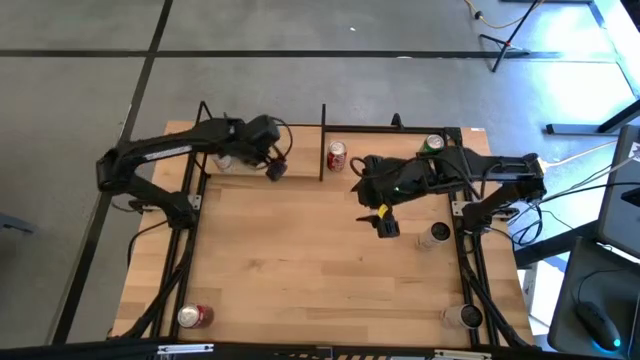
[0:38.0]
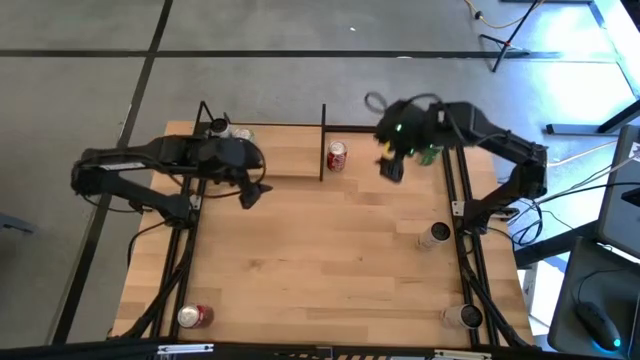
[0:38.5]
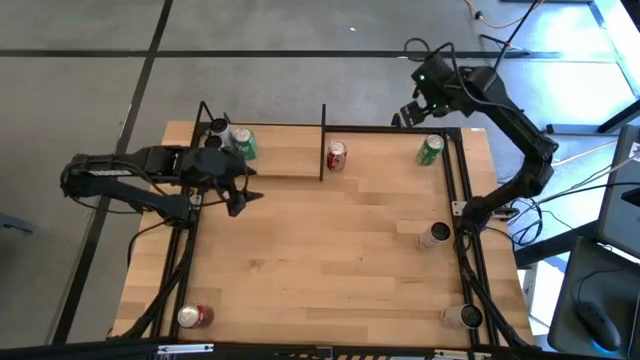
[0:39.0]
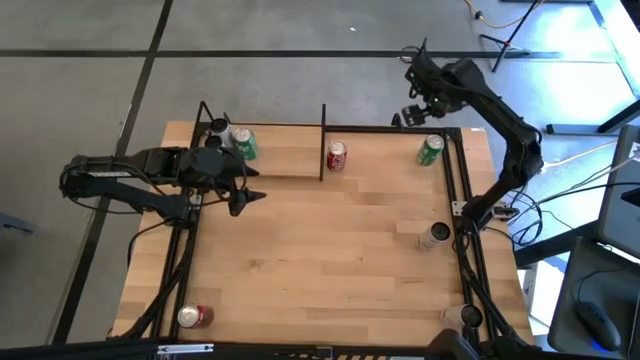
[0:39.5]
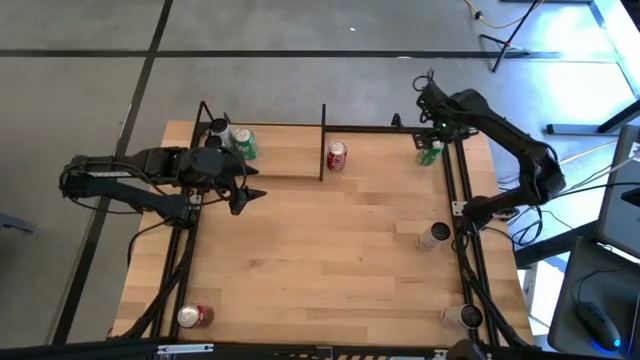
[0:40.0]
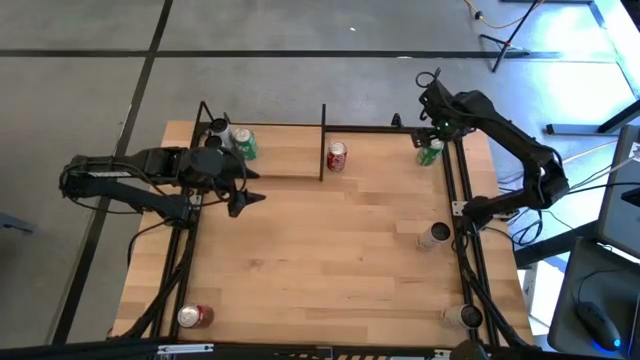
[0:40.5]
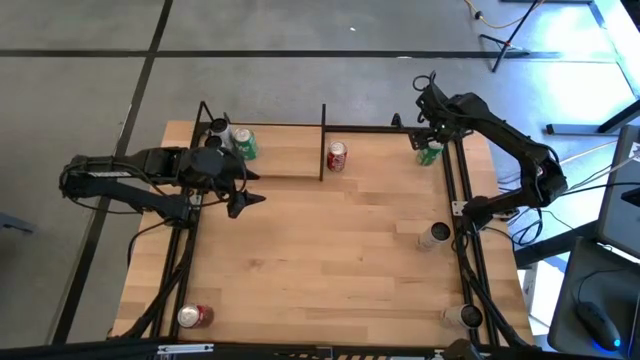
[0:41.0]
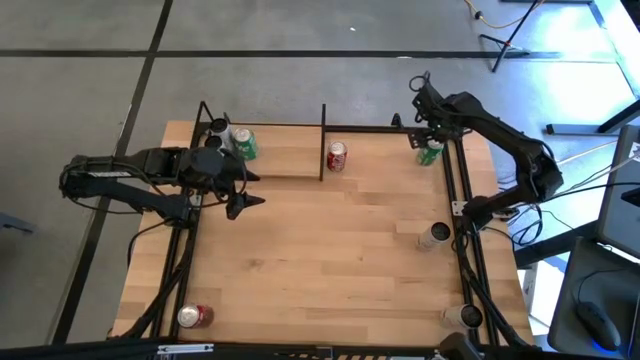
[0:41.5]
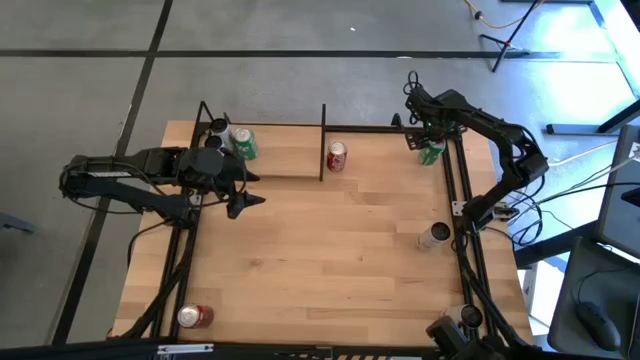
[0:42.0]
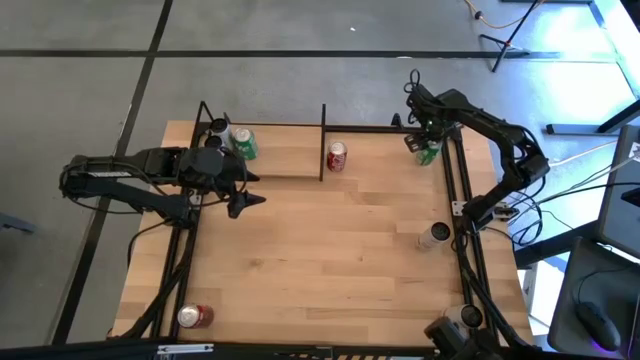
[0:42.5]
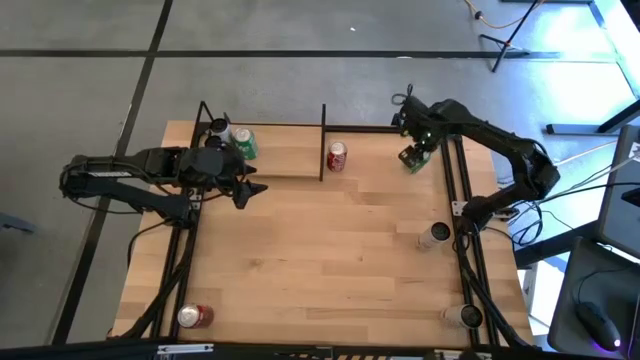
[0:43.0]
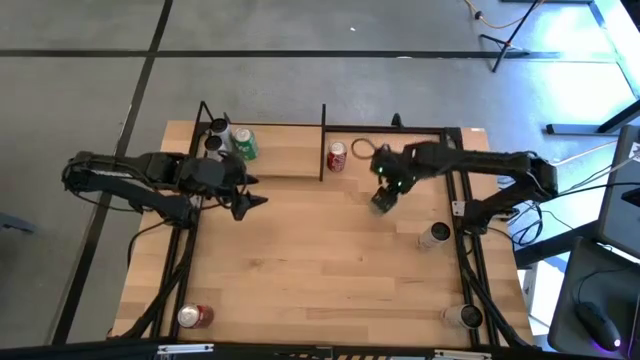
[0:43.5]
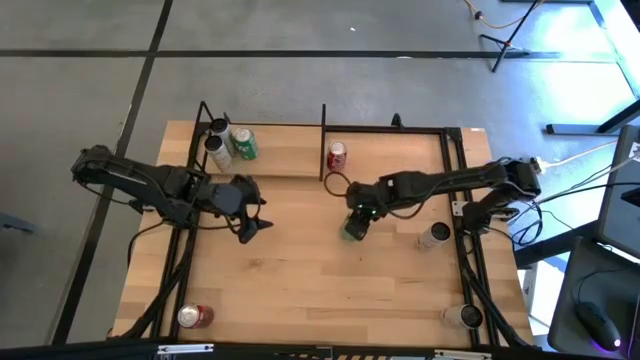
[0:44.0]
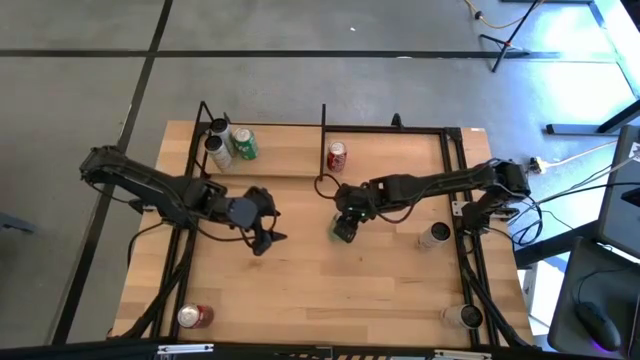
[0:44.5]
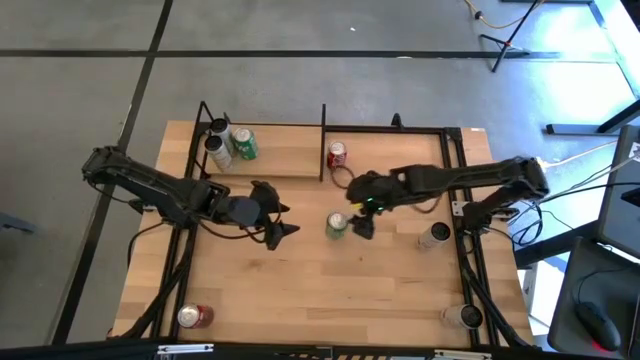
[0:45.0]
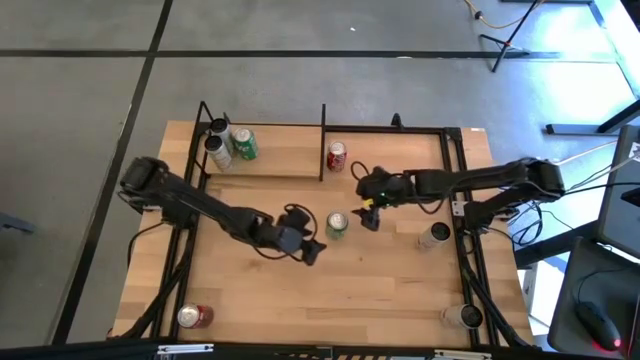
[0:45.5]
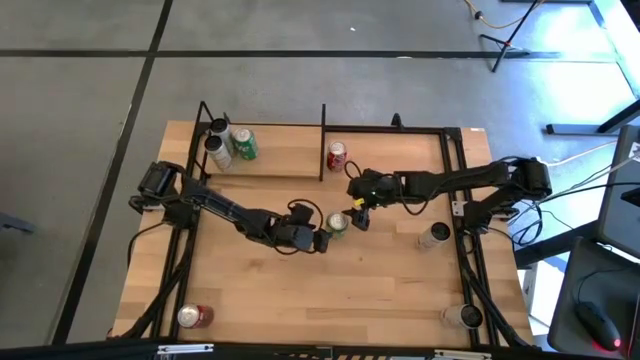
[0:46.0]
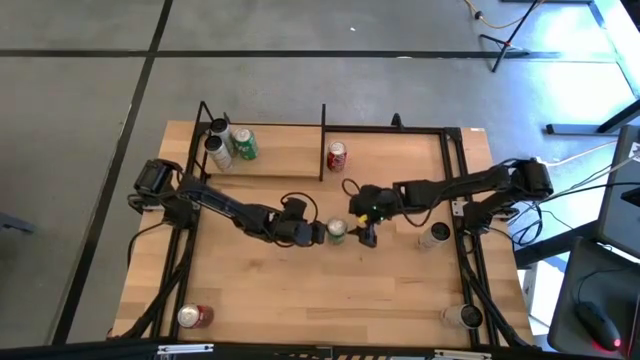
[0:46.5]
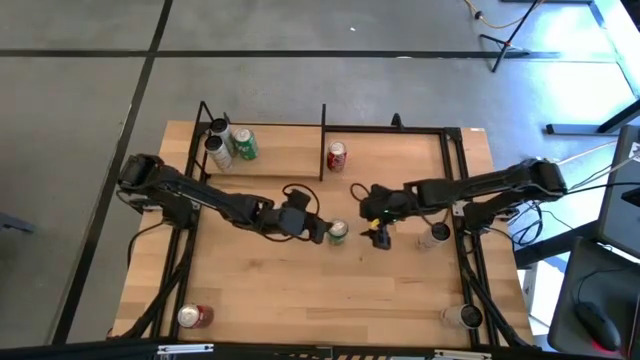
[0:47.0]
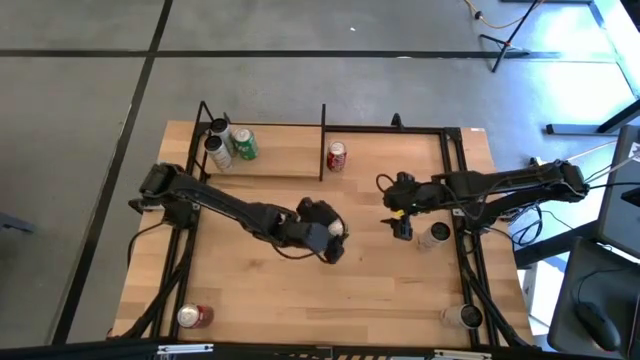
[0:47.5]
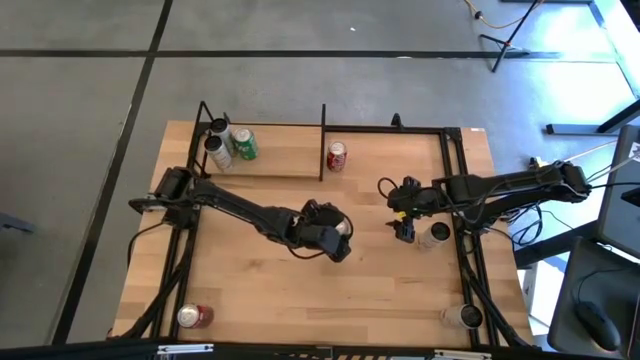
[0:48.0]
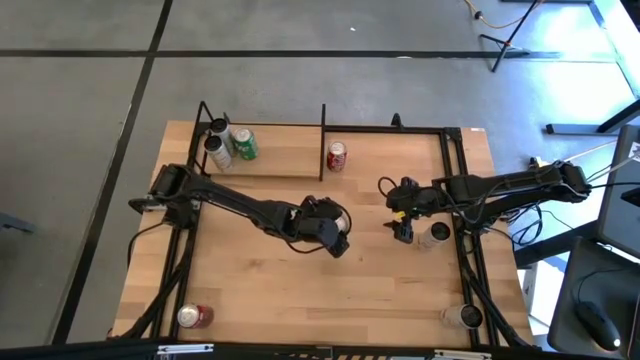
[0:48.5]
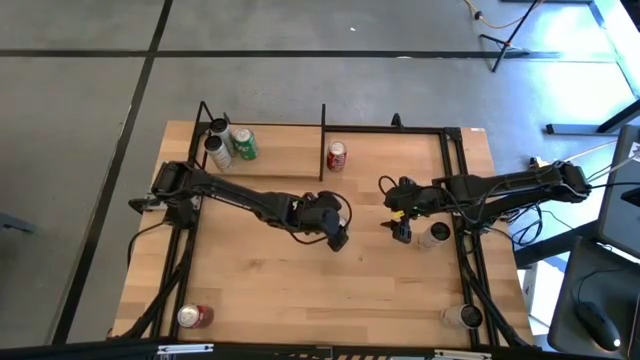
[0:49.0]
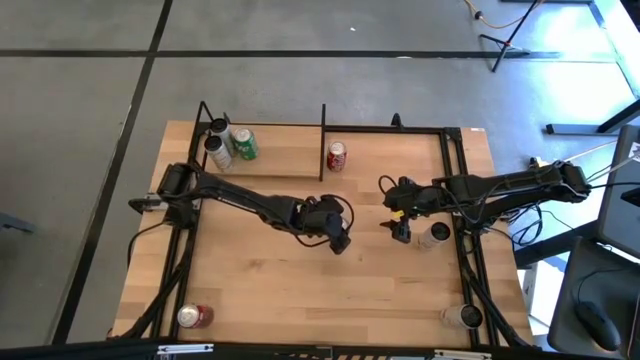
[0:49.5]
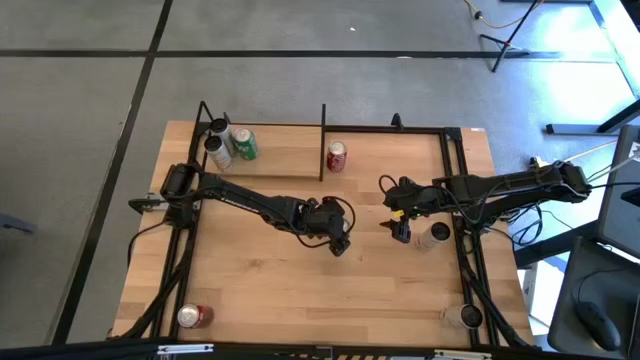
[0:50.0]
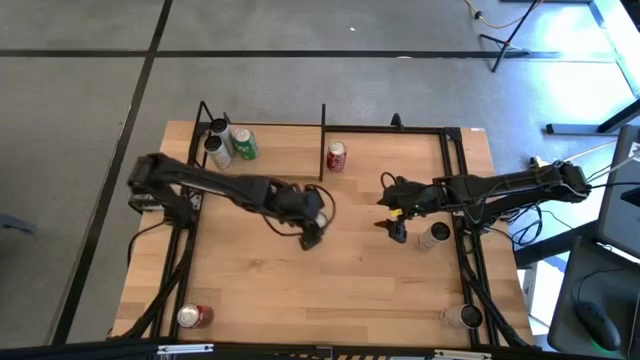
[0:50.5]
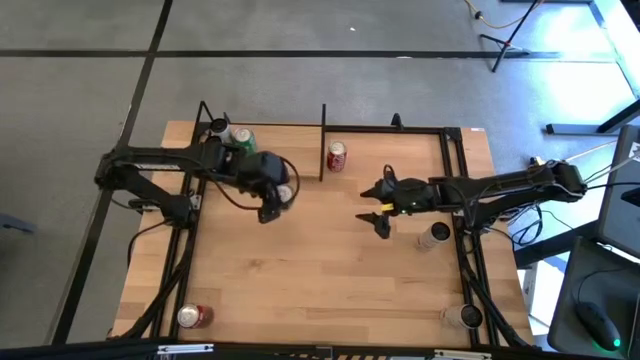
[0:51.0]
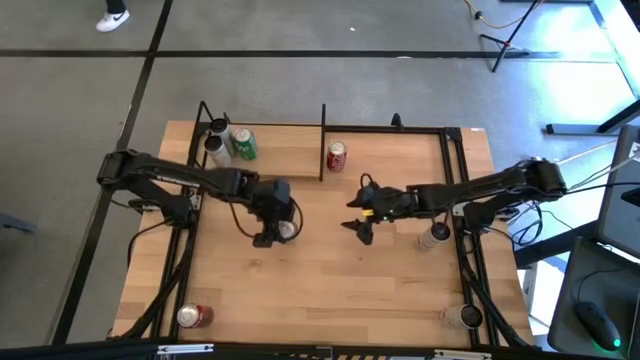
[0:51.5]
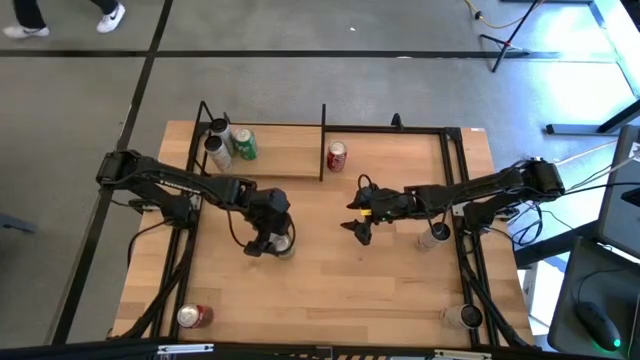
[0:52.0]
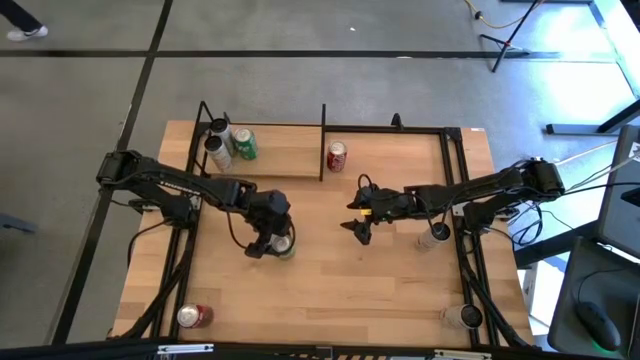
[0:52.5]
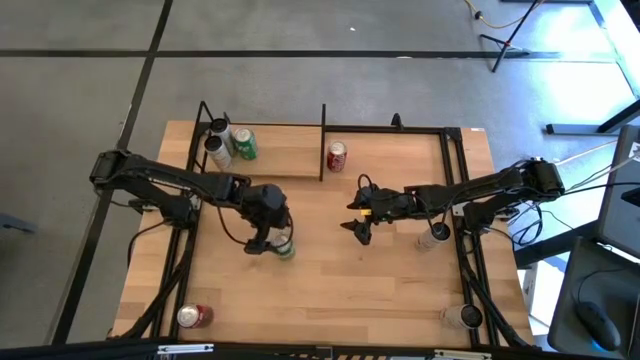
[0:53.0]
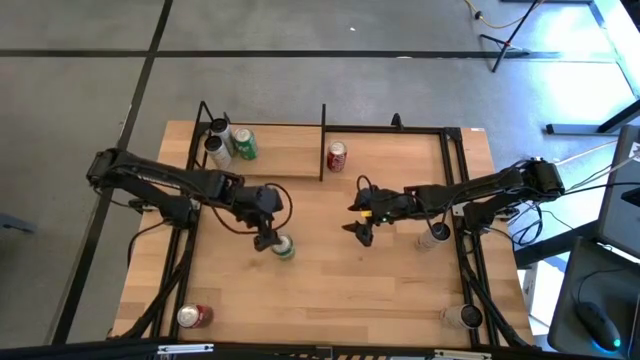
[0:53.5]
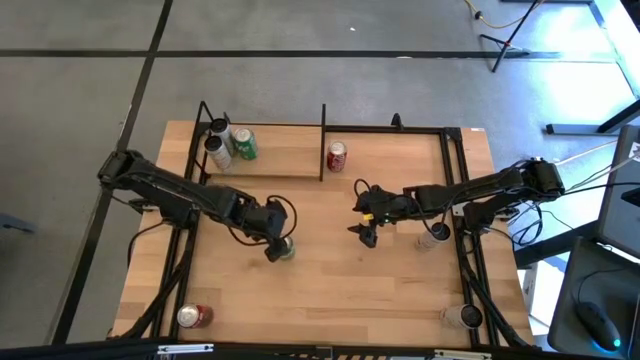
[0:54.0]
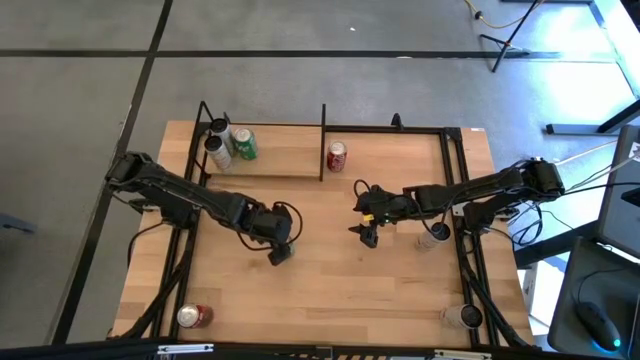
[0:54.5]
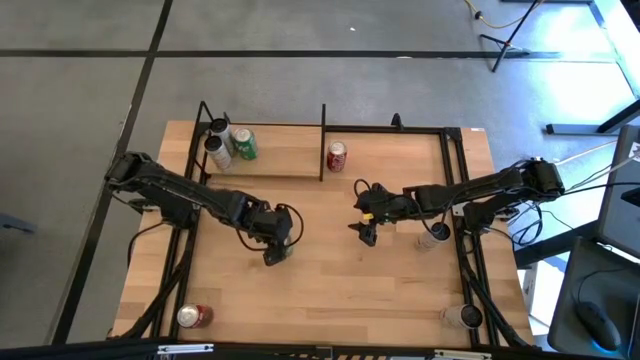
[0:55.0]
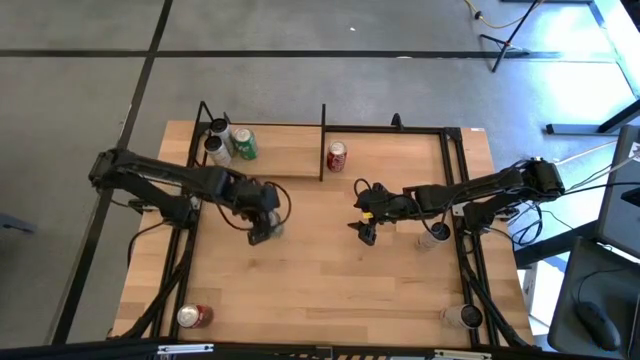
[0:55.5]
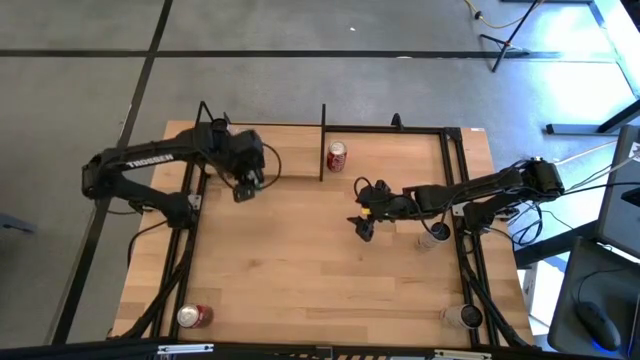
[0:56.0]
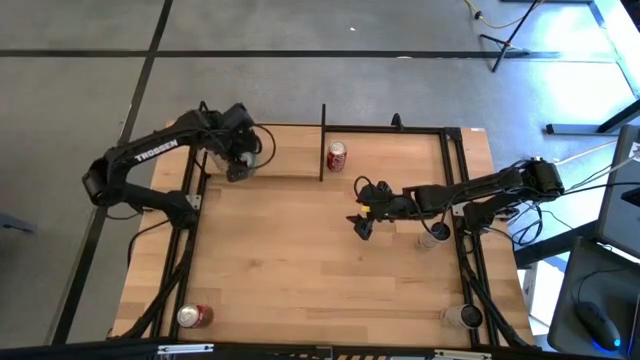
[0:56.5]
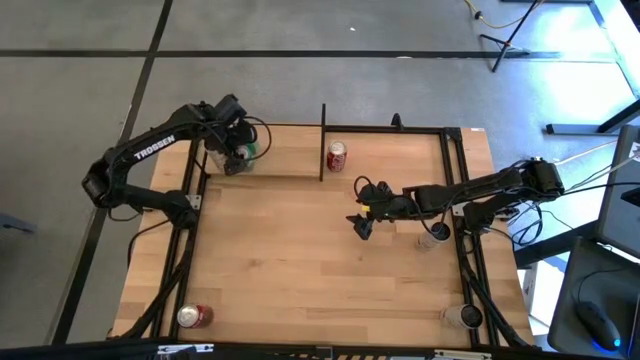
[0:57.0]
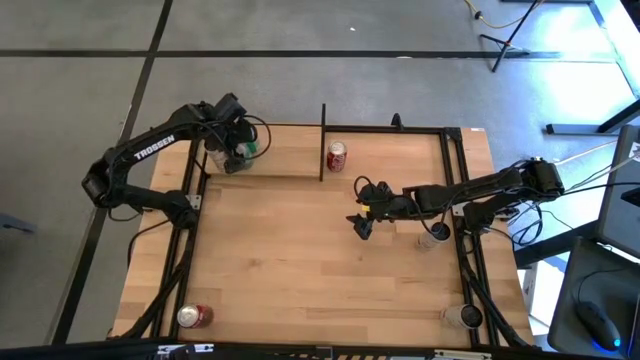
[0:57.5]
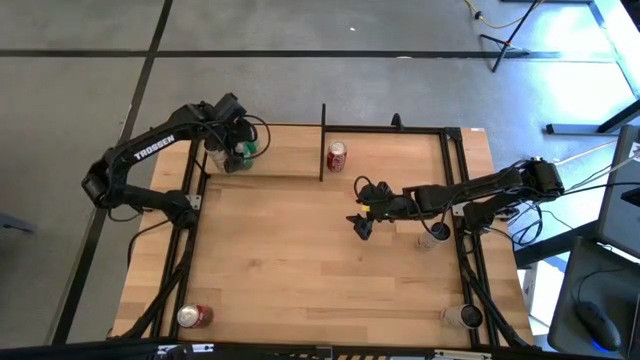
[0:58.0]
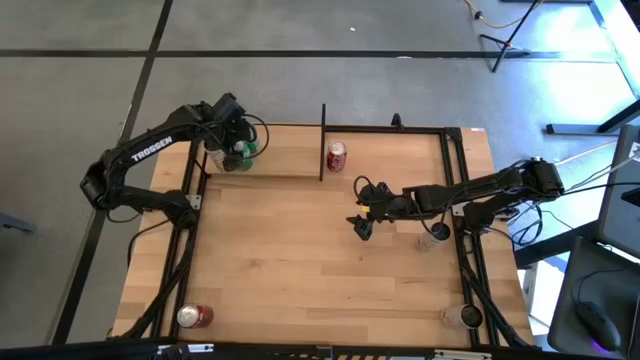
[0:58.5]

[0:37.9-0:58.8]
Task: Place canned beverage on shelf
Put the green soda can on the shelf
